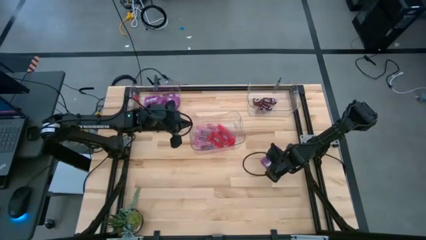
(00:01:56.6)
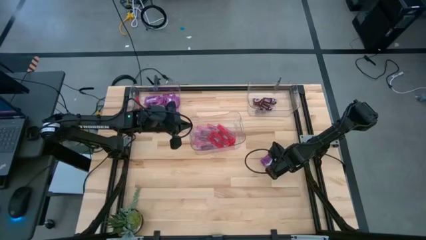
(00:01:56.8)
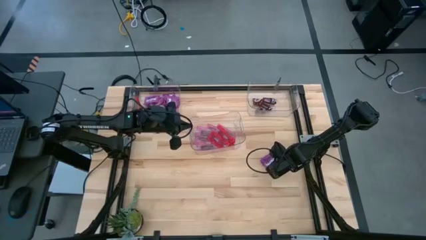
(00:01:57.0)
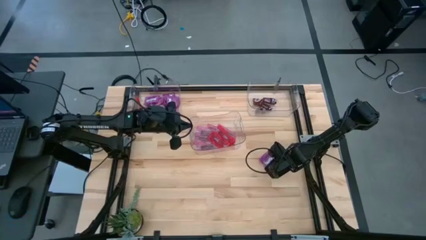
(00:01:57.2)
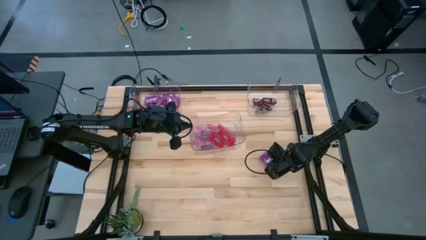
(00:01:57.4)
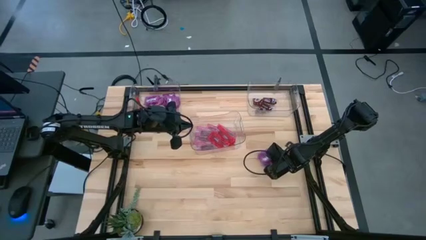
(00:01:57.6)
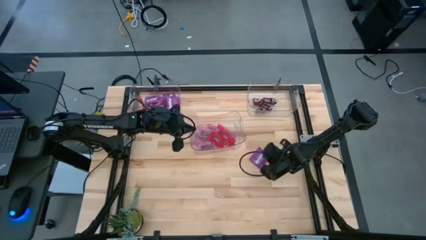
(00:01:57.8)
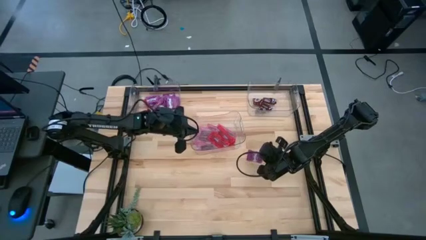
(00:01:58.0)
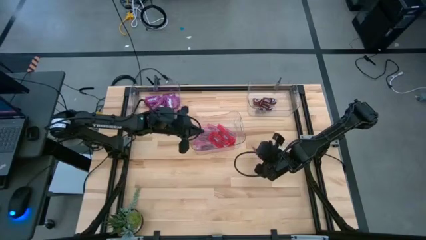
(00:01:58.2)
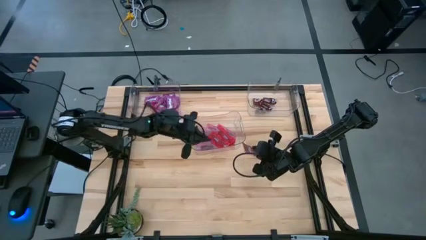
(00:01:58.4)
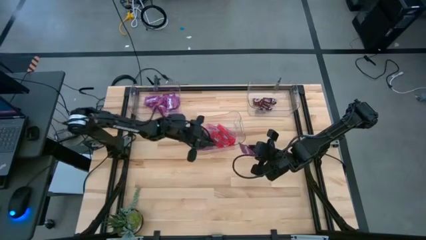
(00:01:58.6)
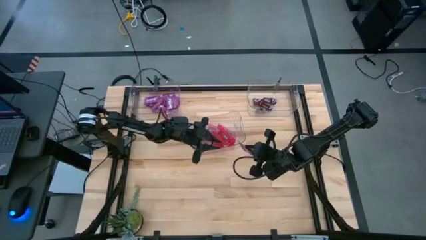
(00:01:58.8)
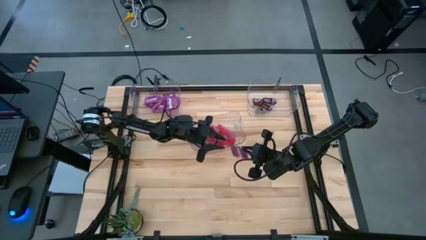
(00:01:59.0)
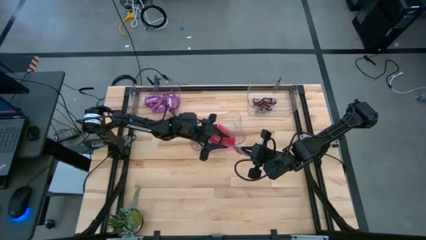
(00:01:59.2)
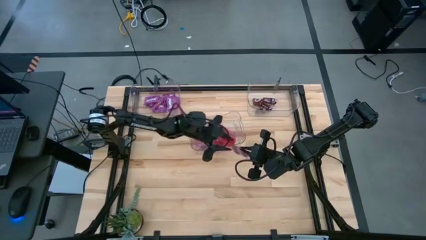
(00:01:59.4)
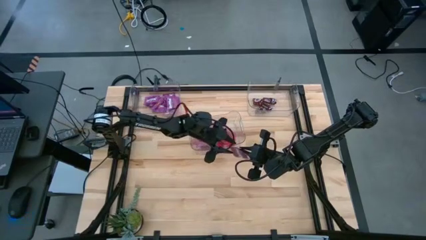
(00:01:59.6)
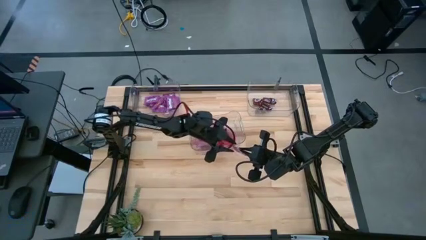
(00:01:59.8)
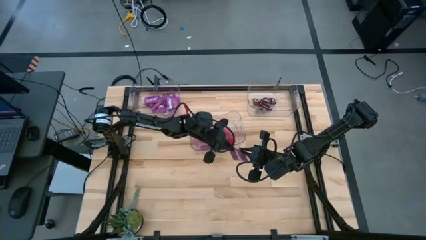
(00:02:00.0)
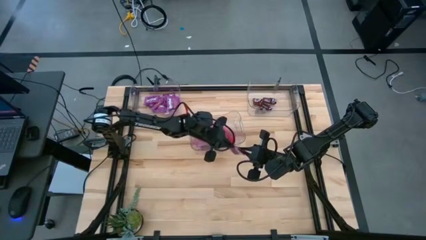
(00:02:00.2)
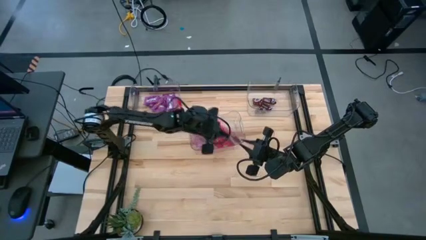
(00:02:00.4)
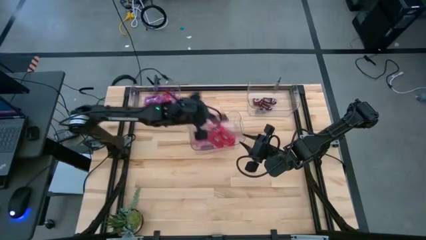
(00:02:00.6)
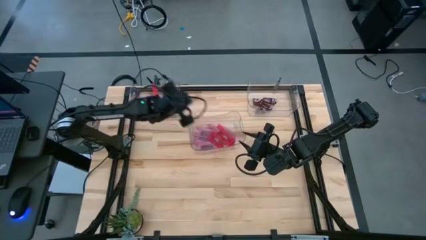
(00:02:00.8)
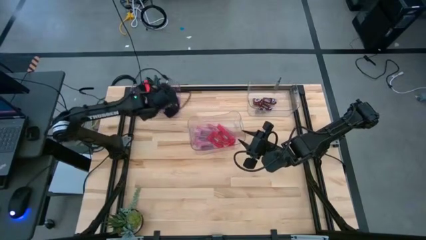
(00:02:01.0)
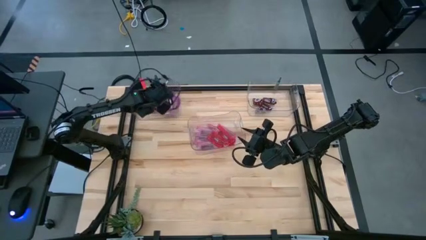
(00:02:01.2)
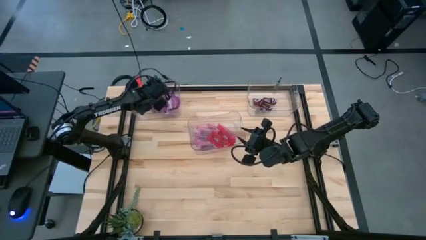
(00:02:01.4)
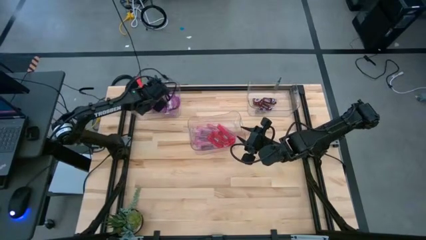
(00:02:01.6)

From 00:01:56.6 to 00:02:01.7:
Task: Sort candy
Put the violet candy pack into the top left transparent bin

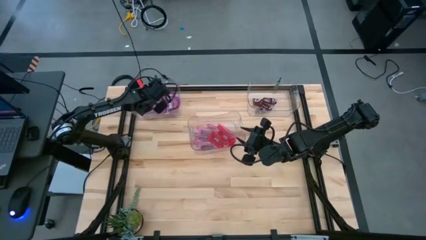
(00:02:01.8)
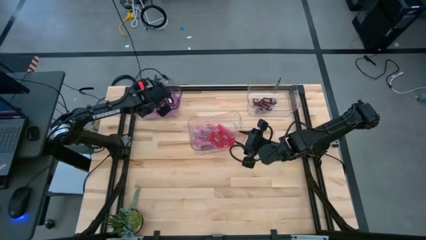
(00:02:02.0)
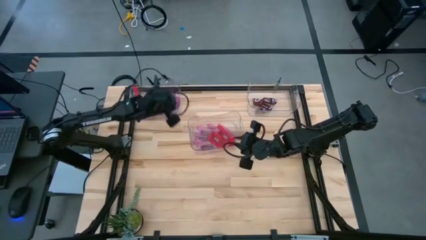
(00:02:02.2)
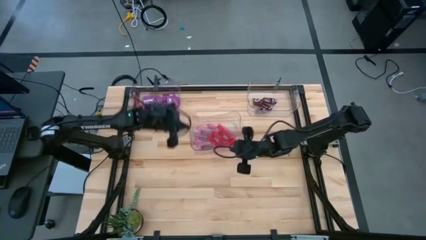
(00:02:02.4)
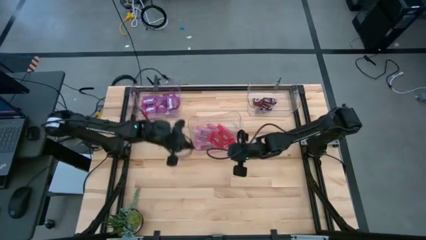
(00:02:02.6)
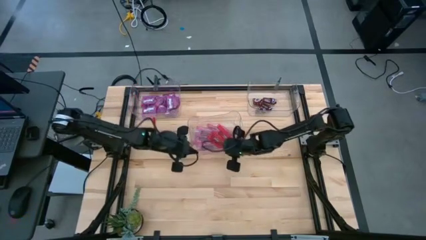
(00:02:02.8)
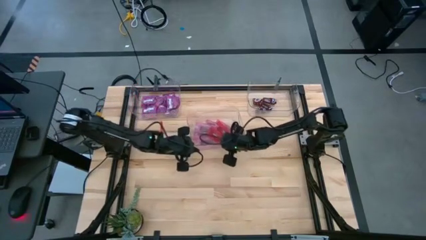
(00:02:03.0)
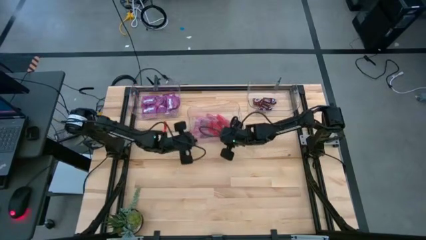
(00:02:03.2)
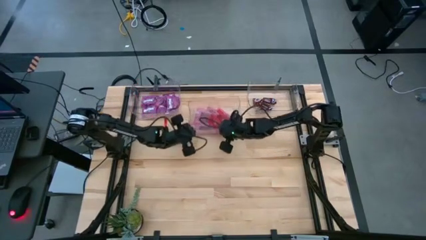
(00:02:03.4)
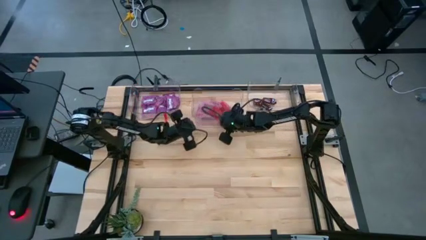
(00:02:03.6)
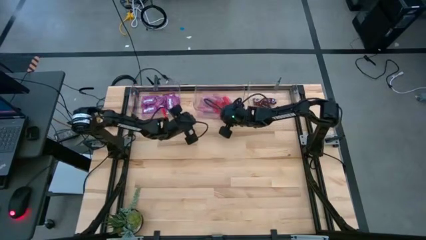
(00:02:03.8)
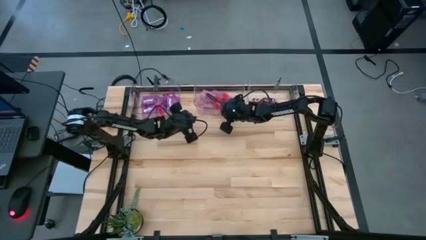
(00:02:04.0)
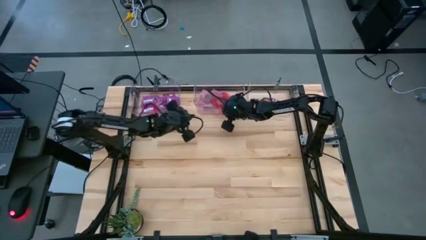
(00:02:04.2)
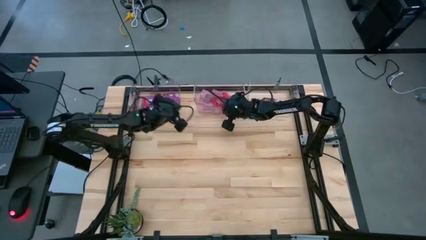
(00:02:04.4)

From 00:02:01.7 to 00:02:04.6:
Move the bottom transparent bin to the top center of the table

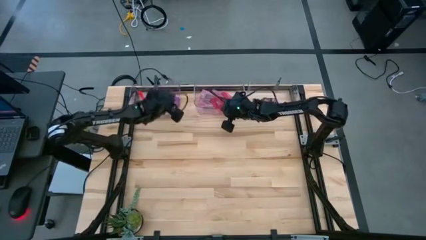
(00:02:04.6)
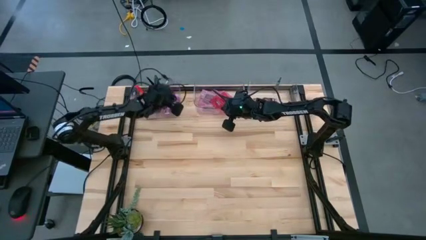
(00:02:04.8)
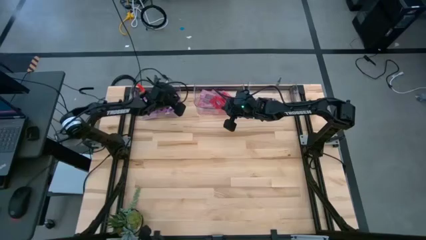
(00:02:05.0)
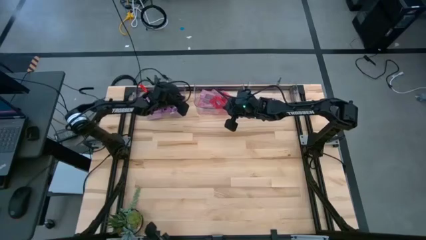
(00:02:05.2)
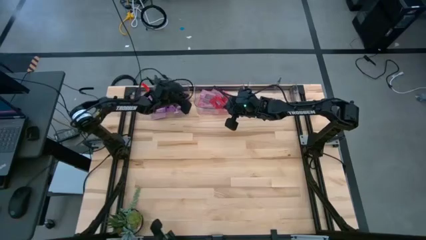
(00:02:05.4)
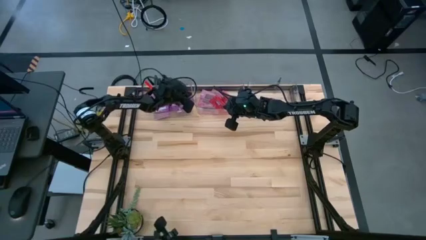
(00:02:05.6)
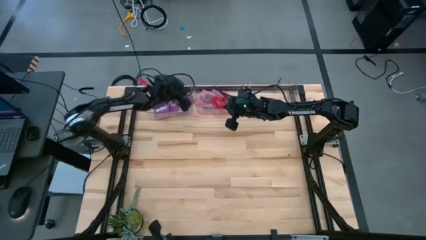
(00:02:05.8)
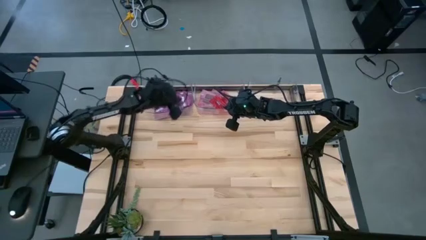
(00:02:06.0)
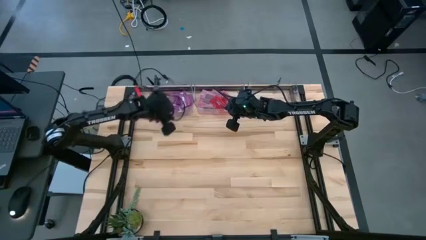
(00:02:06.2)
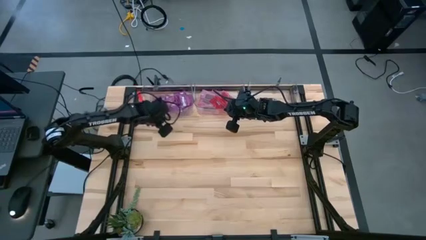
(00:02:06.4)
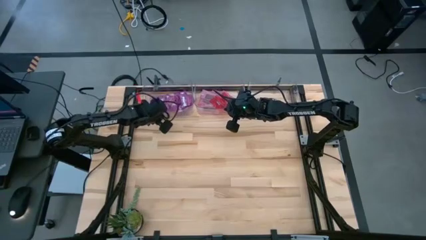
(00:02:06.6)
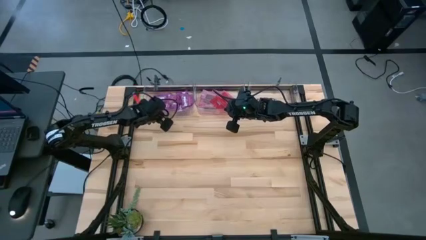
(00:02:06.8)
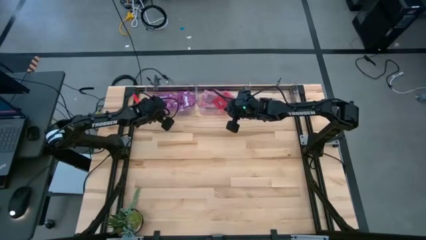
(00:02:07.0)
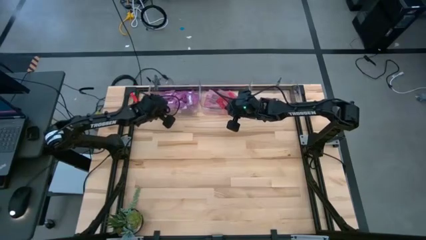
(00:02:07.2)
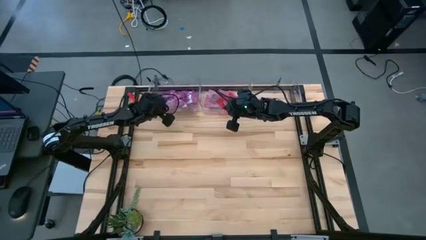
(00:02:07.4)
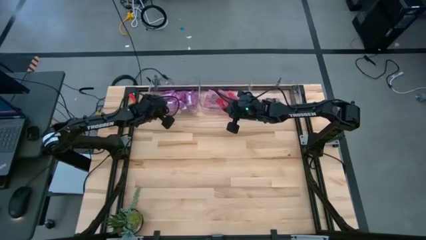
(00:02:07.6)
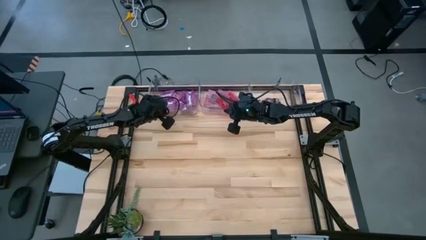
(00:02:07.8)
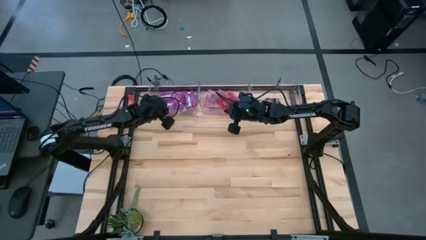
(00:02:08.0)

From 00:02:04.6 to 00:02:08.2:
Adjust the left transparent bin

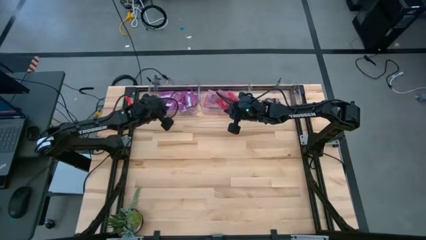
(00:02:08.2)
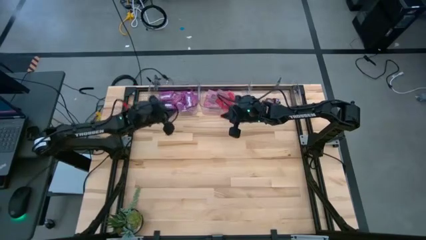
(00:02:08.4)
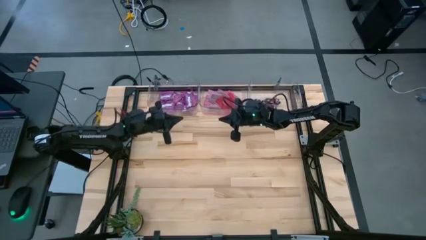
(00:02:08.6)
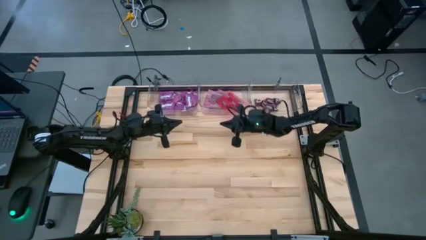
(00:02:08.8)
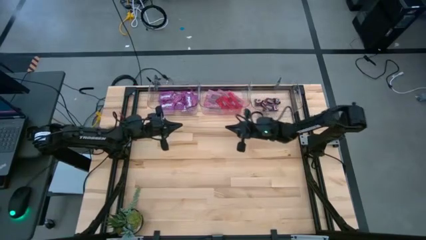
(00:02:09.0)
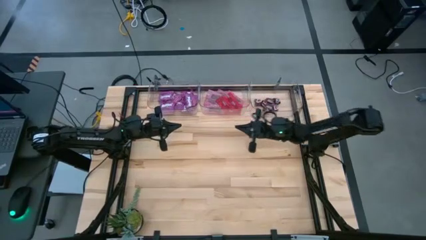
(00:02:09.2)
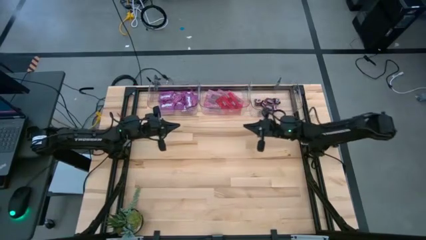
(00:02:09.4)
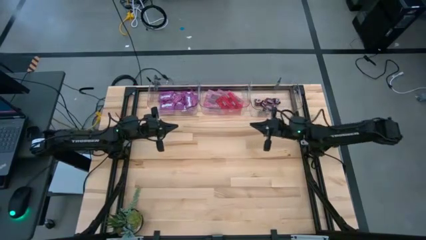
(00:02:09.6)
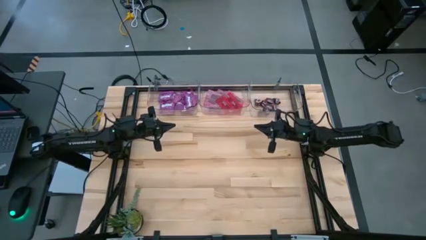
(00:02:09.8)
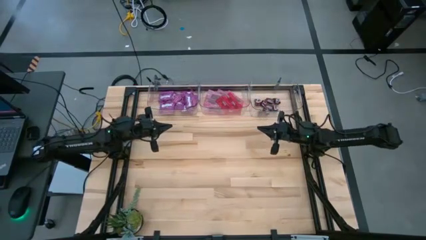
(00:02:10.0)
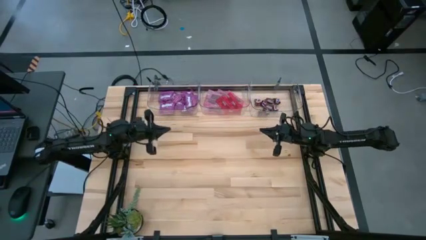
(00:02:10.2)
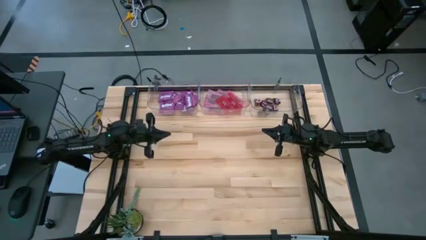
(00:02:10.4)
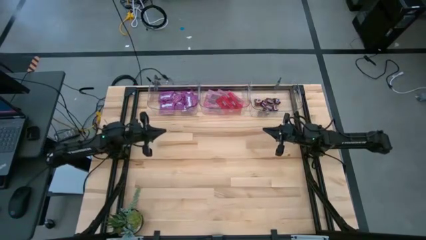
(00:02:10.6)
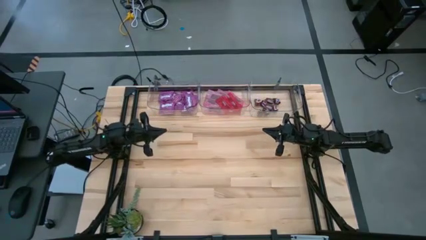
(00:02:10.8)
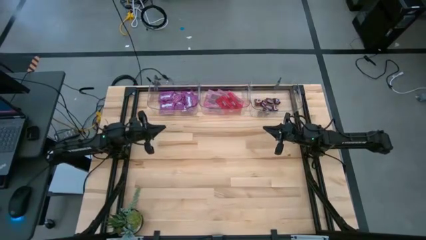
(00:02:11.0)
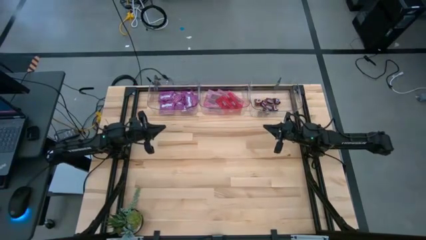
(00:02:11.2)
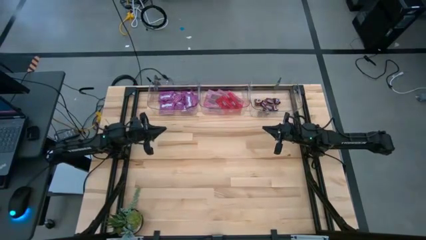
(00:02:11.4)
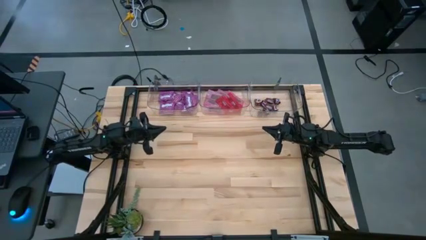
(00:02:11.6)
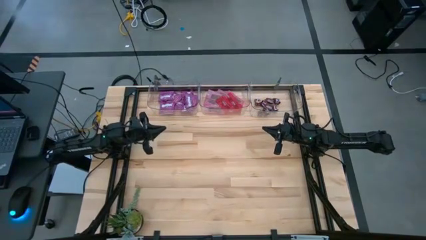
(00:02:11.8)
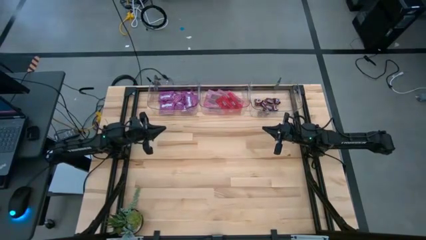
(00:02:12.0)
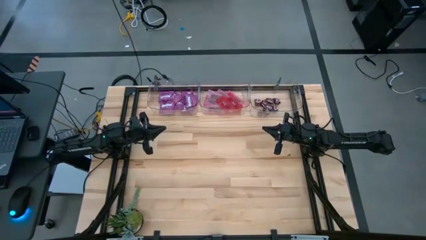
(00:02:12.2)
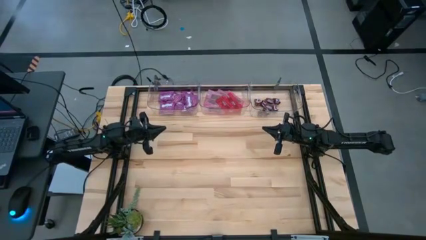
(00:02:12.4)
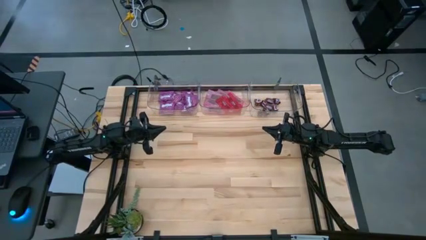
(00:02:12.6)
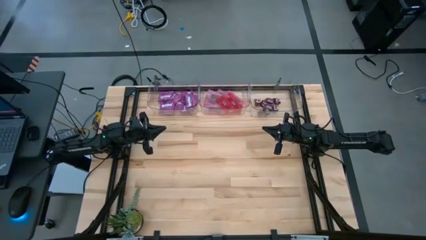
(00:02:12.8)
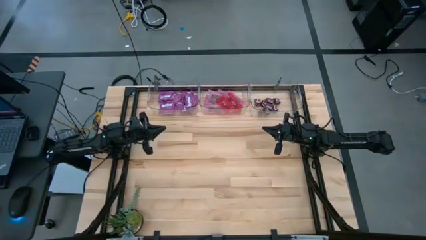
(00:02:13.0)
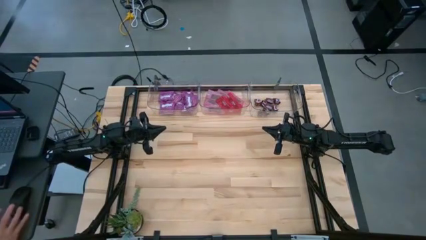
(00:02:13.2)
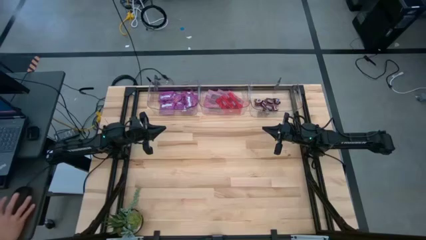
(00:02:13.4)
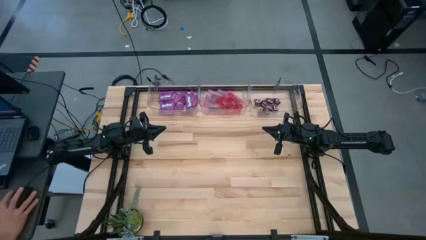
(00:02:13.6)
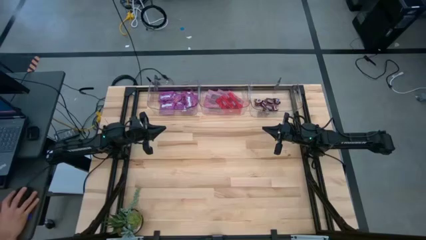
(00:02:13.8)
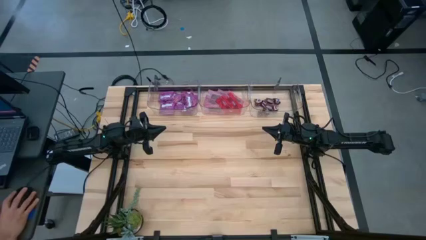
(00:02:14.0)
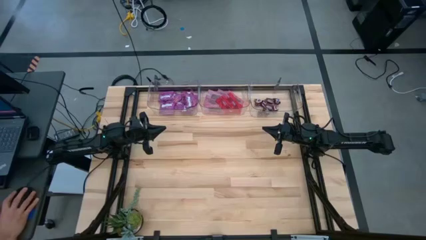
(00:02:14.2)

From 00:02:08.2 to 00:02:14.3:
Return to Home Position
